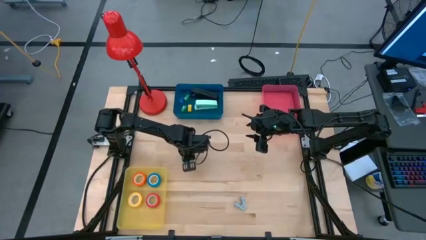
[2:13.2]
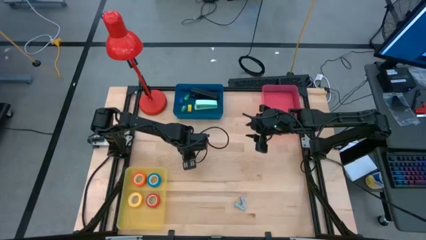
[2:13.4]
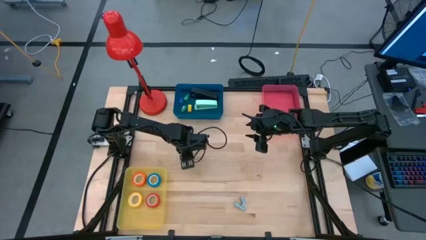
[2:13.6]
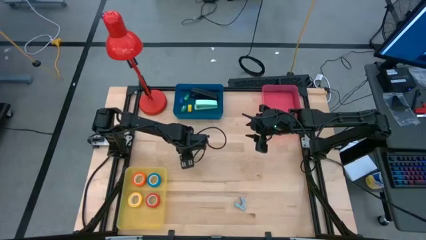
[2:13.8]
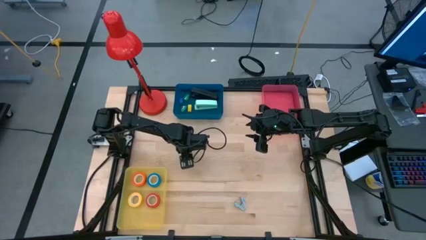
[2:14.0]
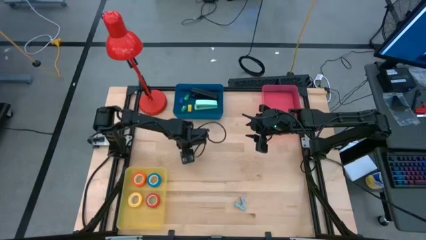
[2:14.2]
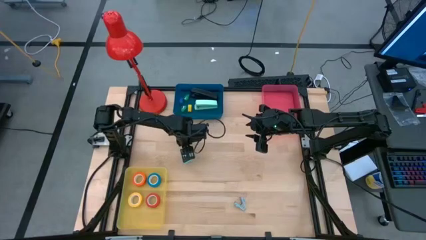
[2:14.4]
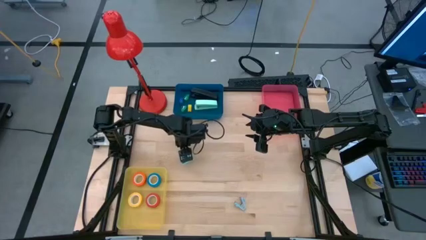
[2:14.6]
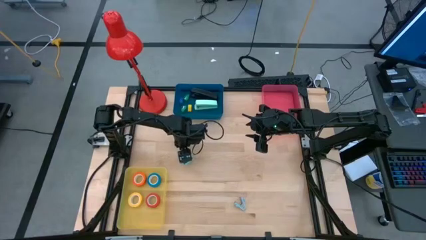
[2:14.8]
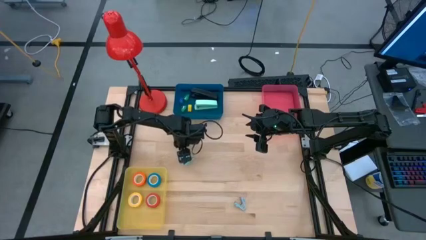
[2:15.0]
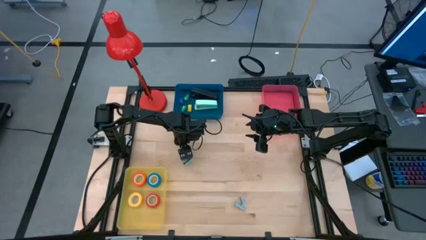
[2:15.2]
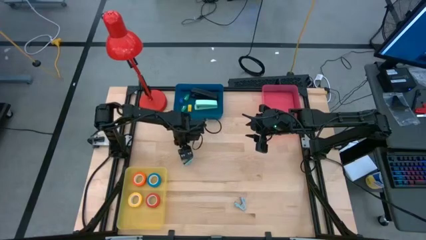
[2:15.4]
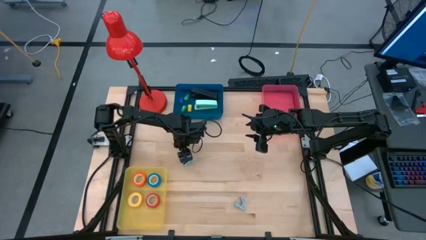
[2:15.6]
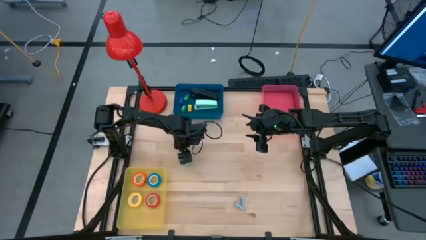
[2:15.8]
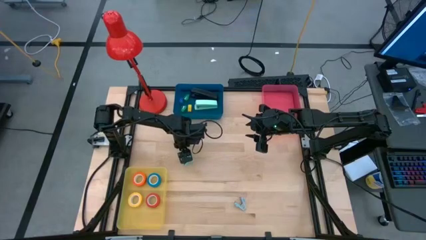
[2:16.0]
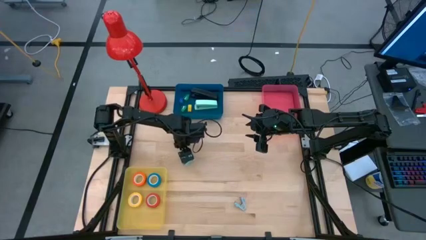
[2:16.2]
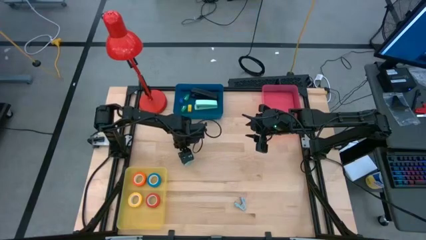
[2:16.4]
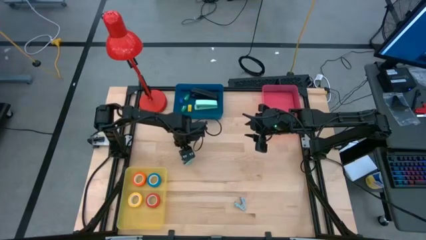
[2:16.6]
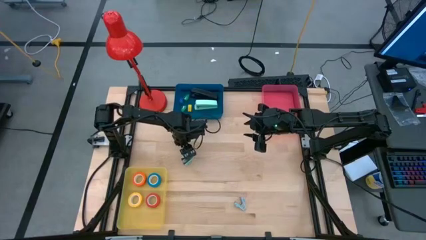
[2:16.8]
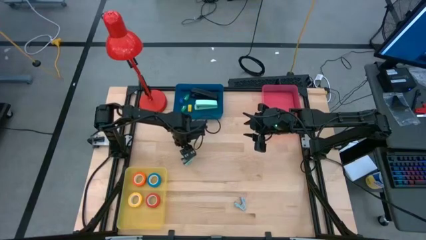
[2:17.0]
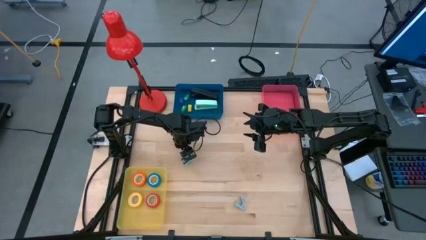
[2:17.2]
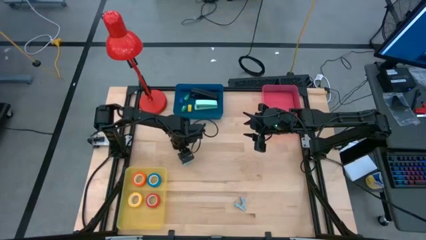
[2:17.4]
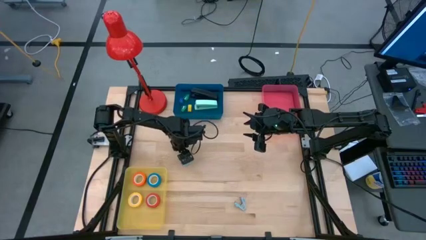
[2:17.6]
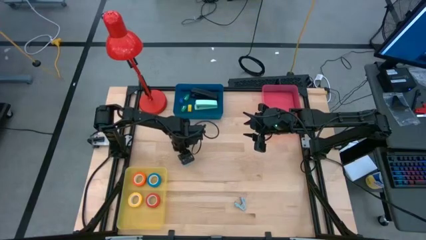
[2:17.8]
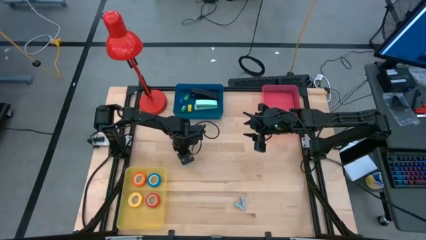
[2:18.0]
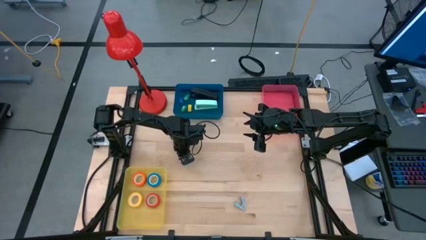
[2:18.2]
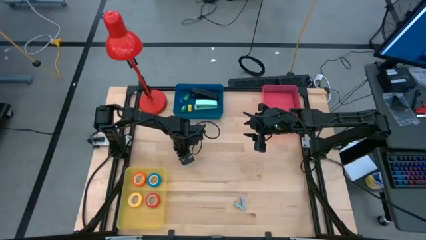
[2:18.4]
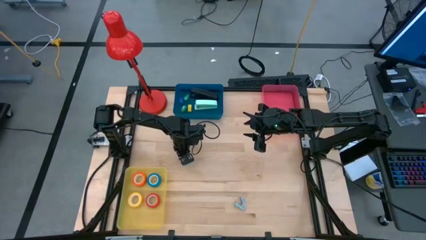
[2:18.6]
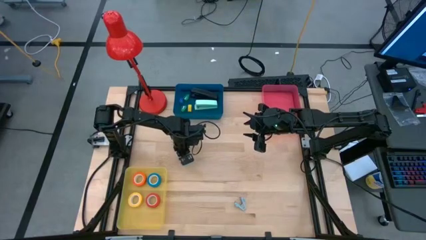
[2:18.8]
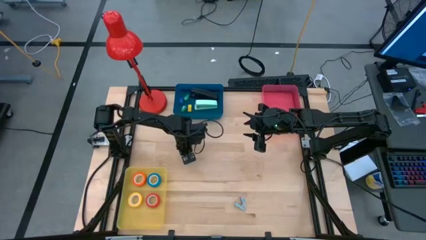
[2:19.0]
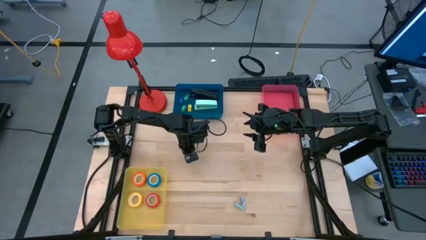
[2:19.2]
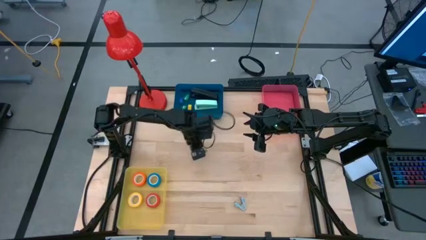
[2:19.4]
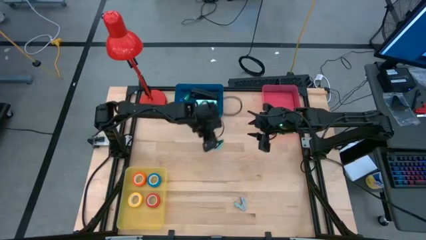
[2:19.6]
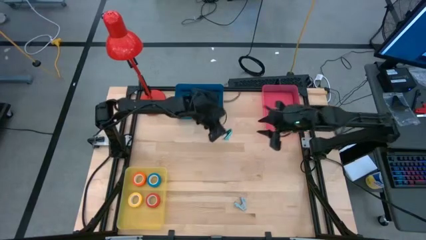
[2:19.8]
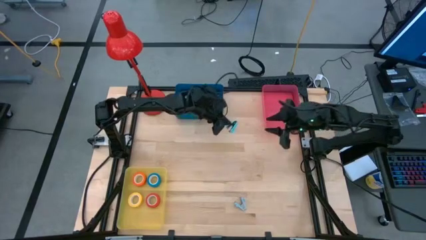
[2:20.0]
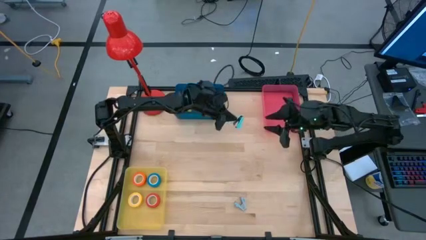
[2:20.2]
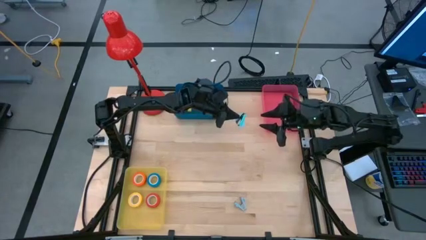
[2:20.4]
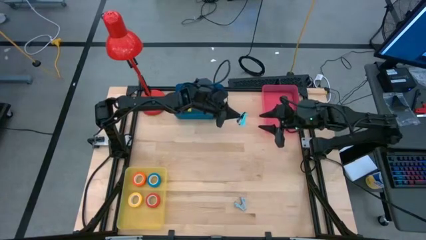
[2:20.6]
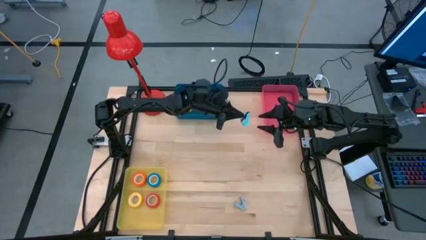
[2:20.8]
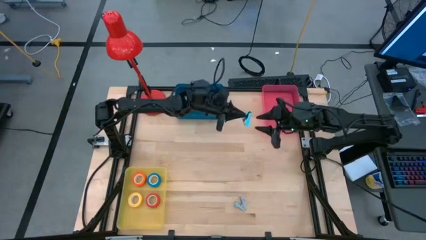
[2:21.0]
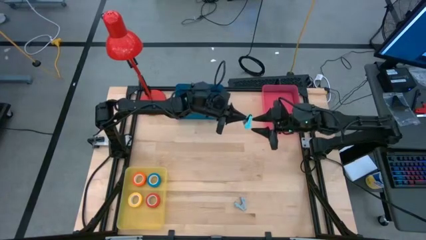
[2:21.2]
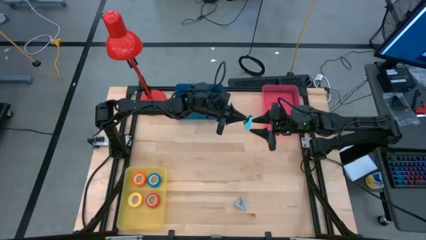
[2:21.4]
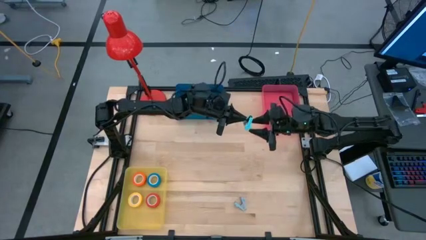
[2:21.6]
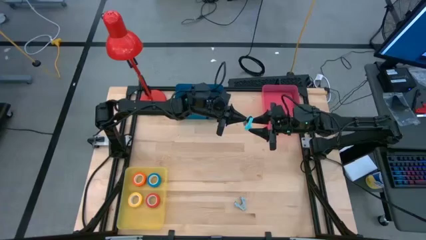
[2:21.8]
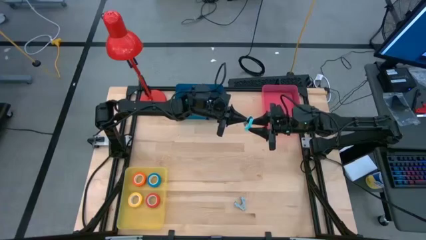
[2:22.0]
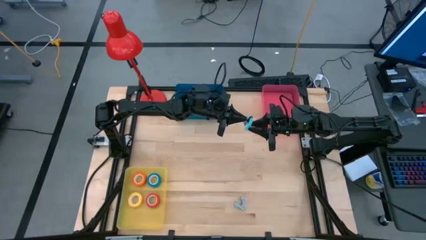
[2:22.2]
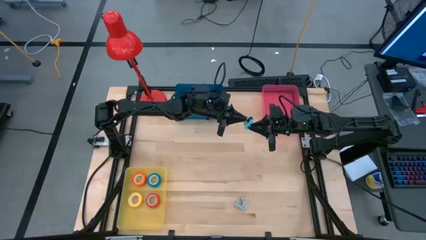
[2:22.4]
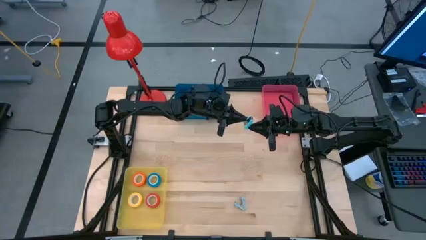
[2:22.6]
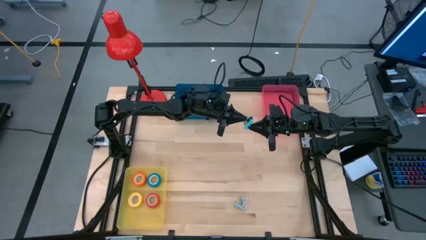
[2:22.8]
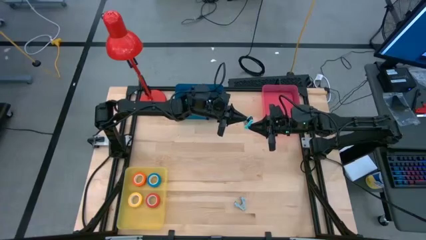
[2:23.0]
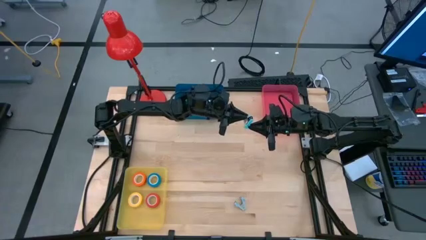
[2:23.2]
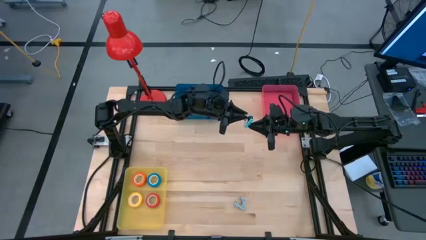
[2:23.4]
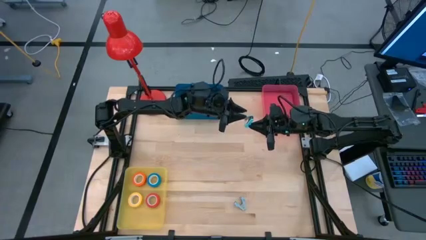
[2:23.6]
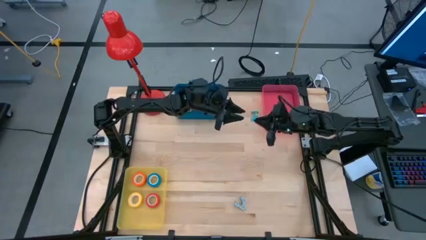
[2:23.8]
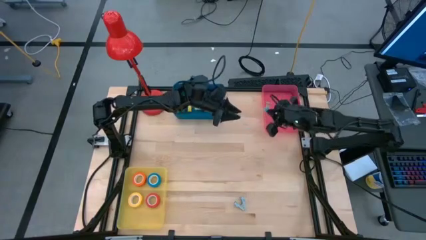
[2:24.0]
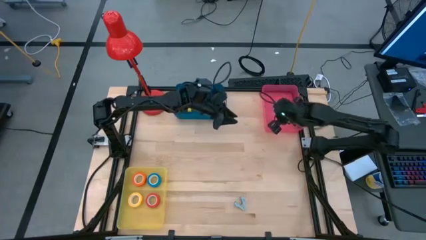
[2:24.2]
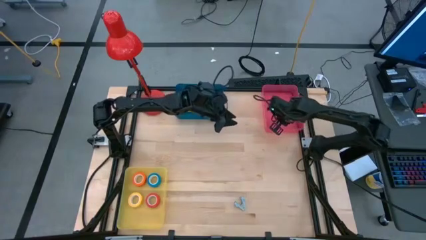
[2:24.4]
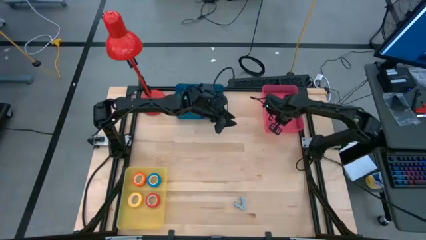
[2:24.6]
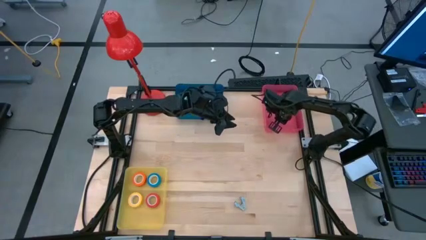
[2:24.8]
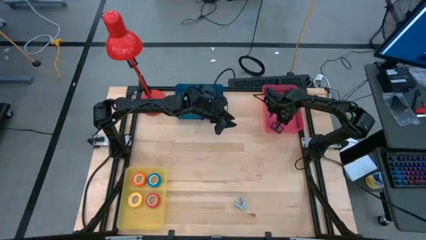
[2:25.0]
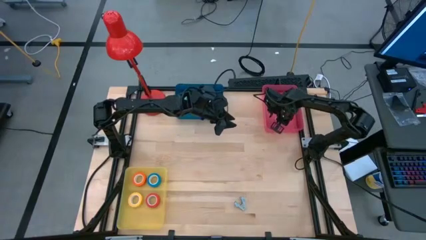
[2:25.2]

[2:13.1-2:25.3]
Task: Pick and place Stapler, Stapler remover, tape
Put the light blue staple remover into the pink bin

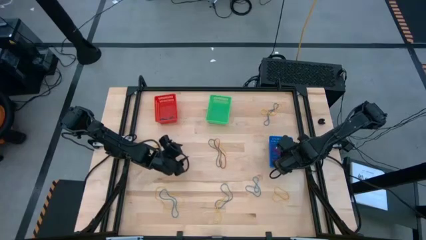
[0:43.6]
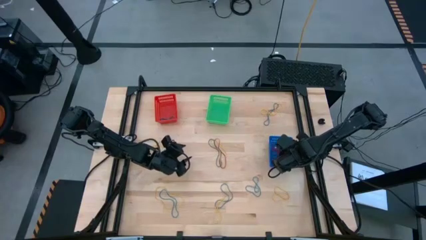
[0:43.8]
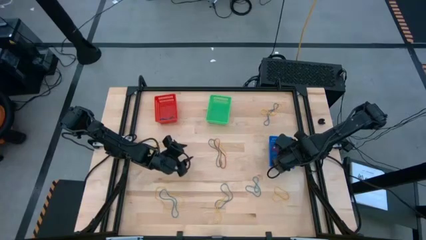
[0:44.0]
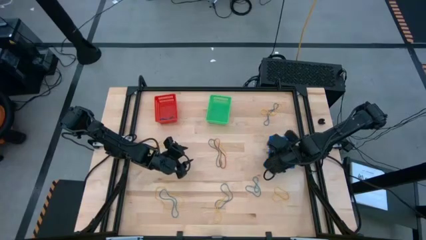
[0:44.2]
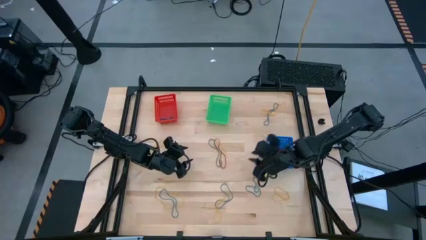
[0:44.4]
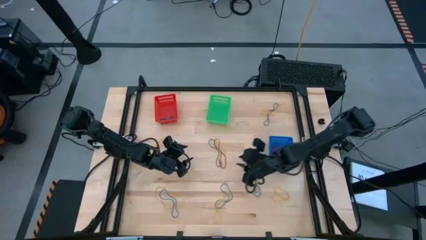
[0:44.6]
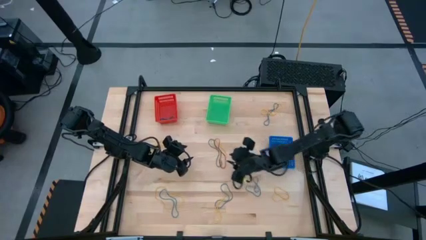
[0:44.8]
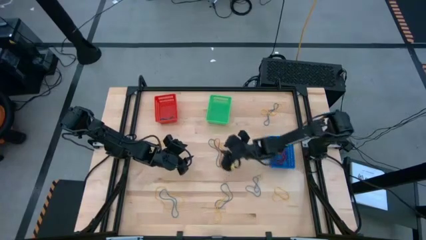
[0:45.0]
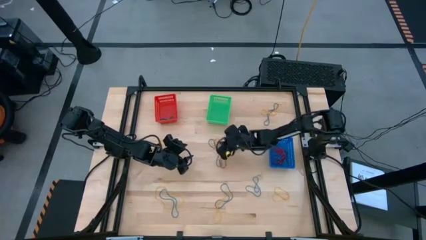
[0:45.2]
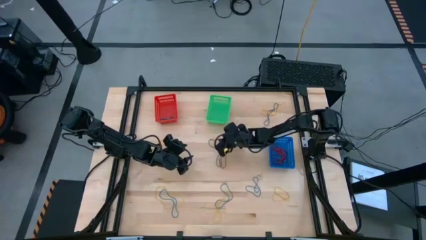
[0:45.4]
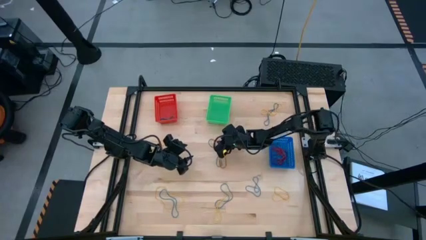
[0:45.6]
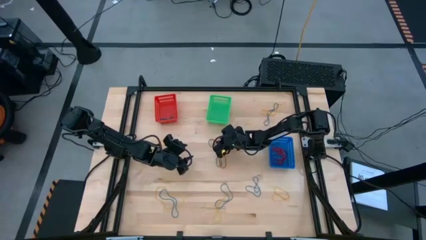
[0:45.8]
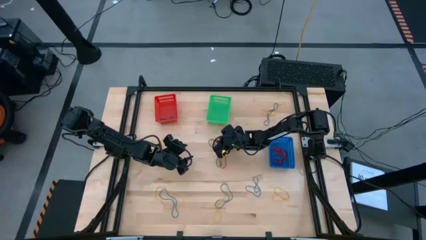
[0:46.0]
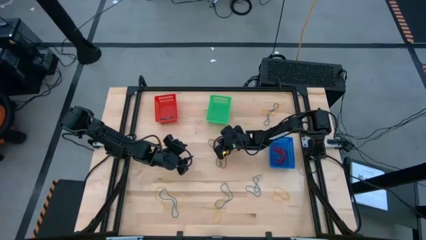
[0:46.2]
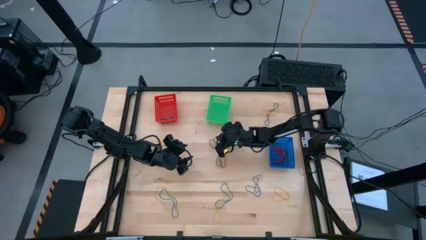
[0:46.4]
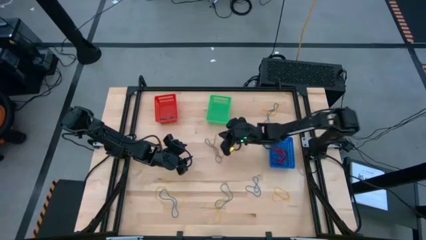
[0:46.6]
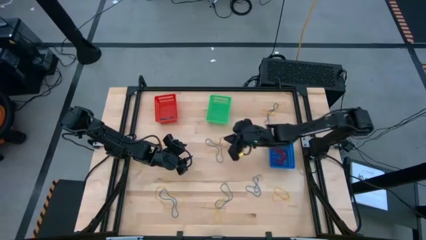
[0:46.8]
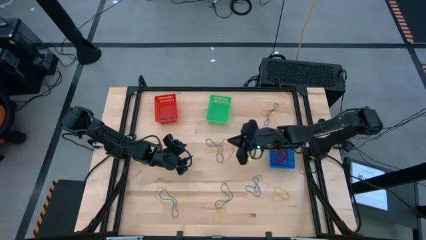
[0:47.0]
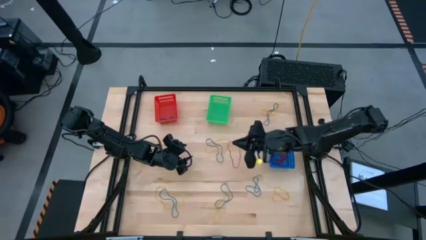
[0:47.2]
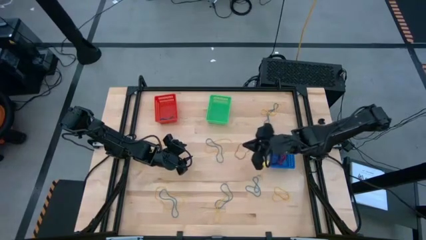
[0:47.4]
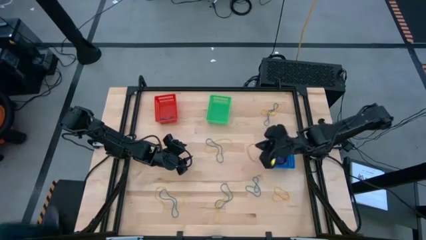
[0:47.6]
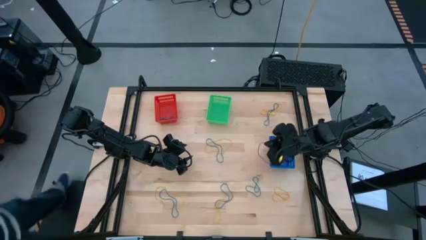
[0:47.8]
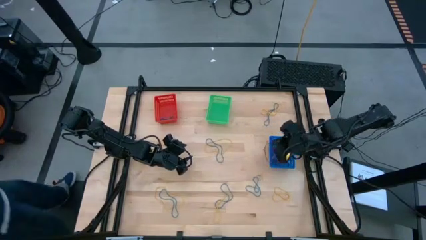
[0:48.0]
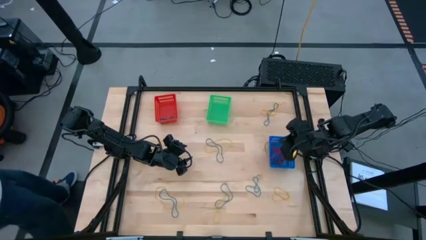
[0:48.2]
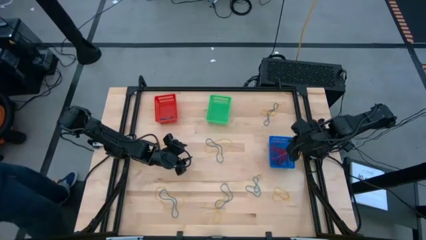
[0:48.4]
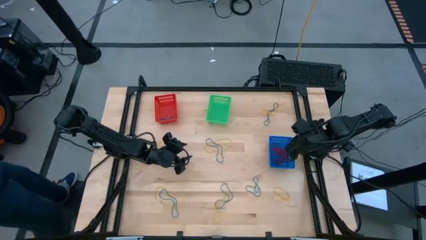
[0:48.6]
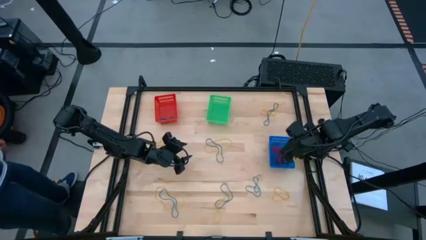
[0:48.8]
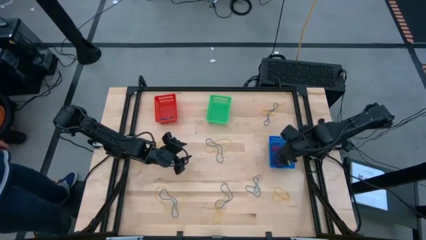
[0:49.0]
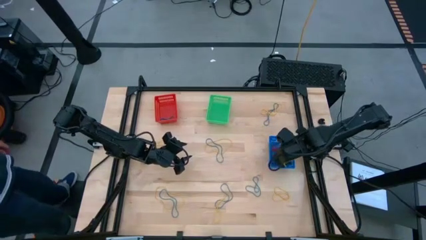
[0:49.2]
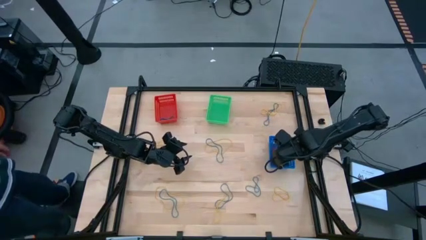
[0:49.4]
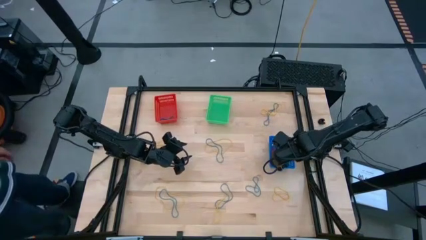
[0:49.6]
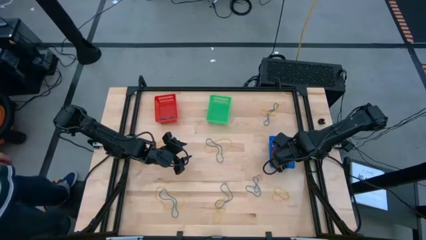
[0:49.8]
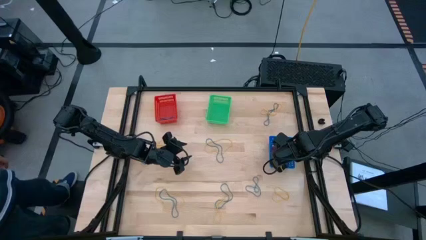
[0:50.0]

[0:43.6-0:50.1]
Task: Sort rubber bands into baskets
Put the red rubber band into the blue bin
